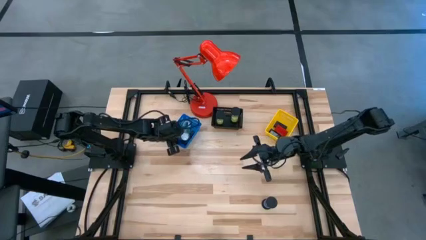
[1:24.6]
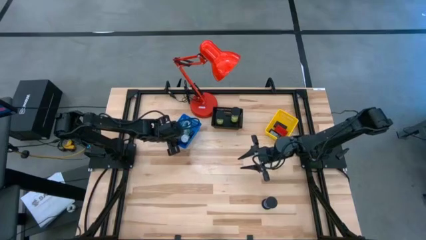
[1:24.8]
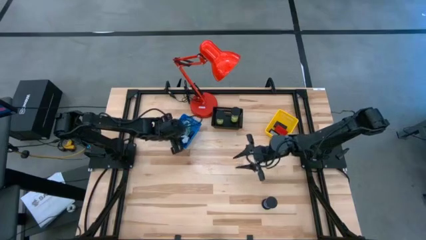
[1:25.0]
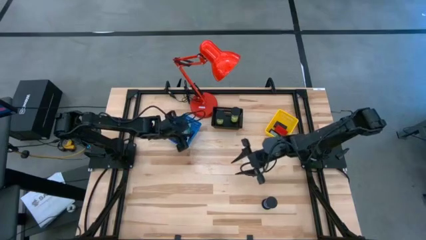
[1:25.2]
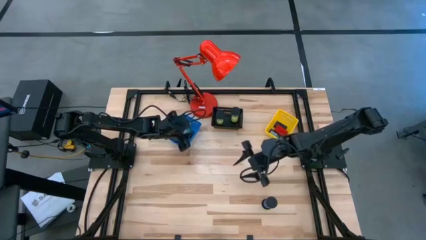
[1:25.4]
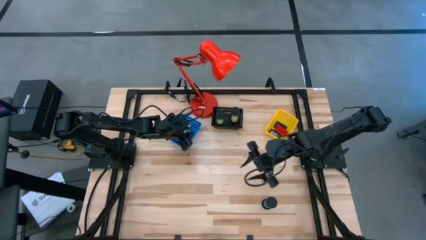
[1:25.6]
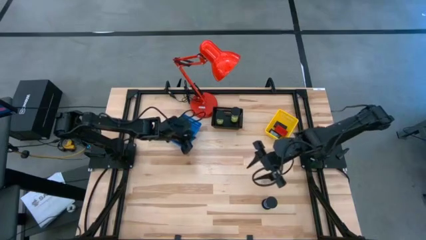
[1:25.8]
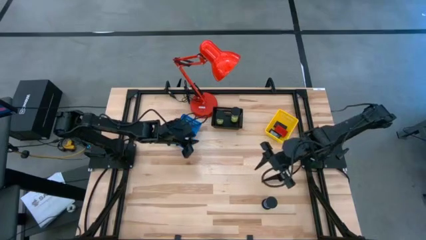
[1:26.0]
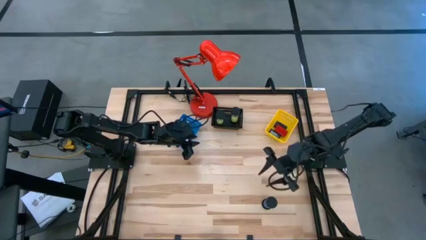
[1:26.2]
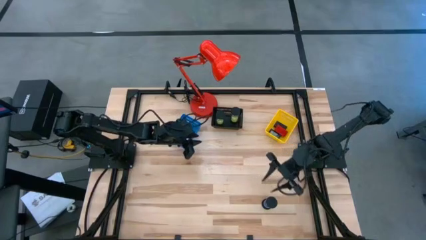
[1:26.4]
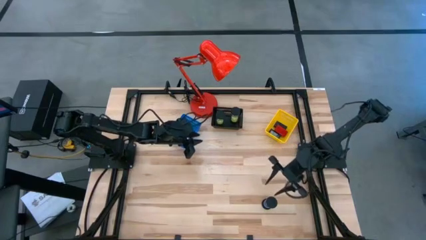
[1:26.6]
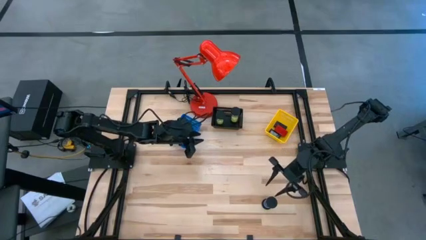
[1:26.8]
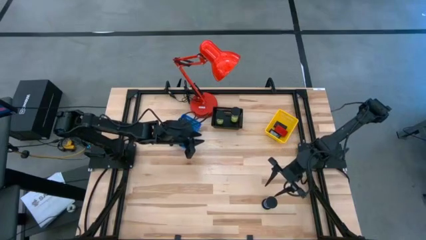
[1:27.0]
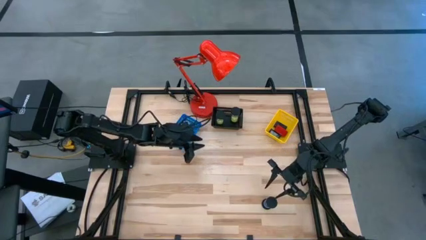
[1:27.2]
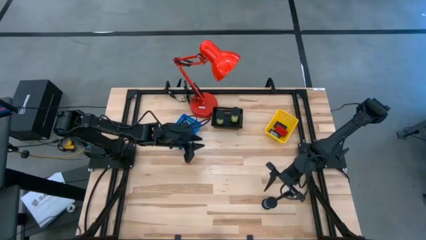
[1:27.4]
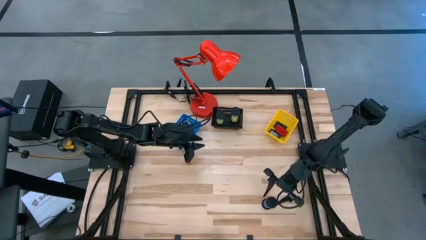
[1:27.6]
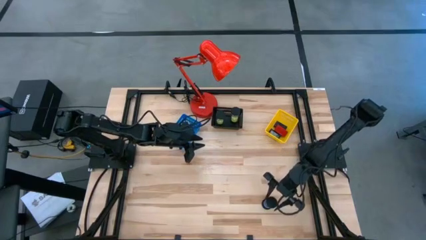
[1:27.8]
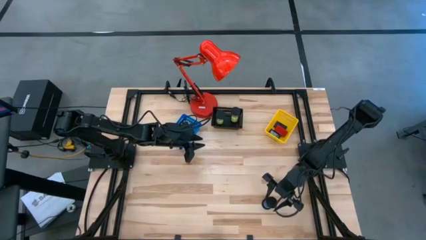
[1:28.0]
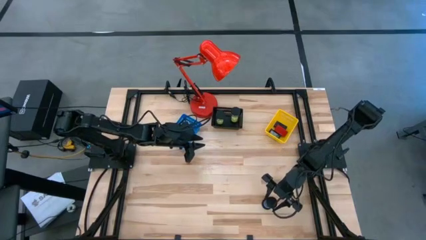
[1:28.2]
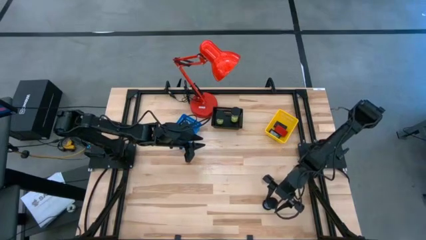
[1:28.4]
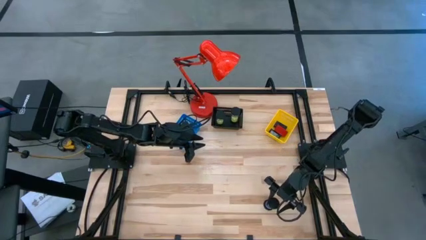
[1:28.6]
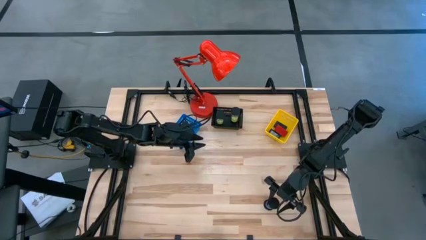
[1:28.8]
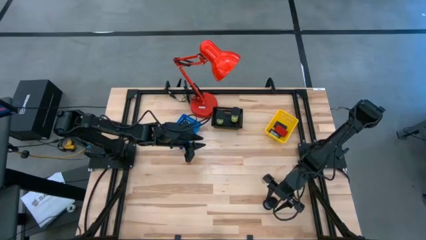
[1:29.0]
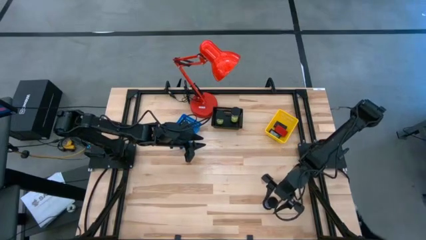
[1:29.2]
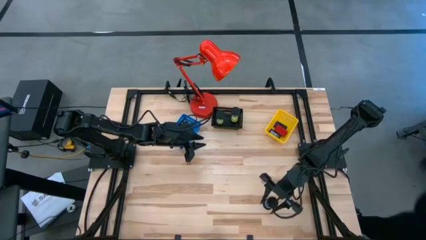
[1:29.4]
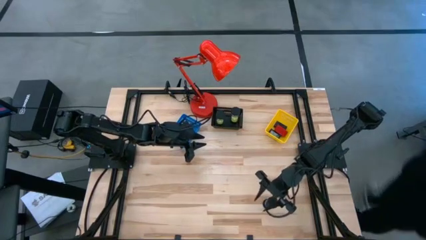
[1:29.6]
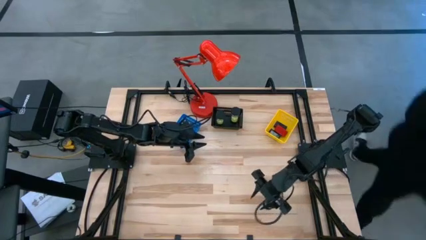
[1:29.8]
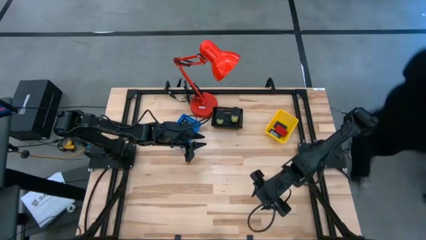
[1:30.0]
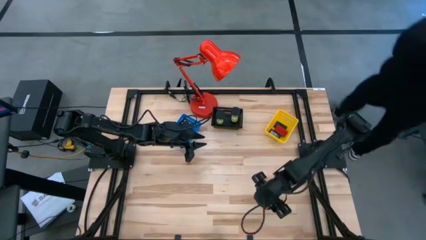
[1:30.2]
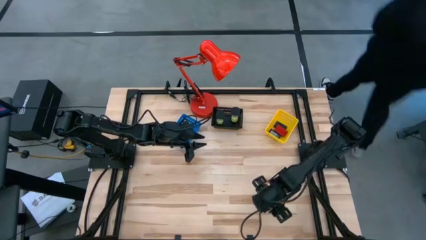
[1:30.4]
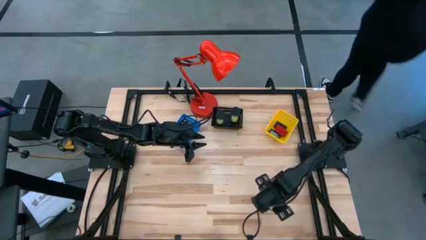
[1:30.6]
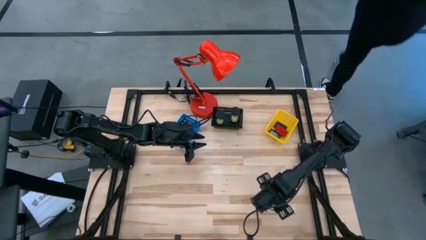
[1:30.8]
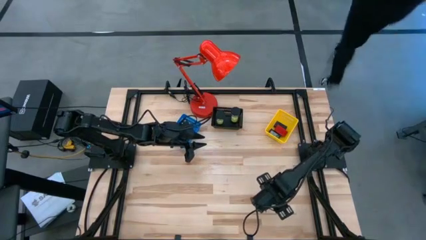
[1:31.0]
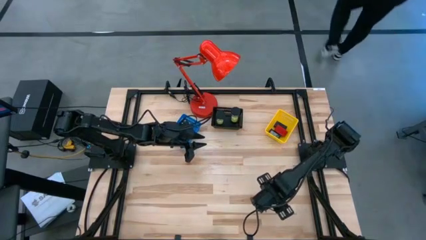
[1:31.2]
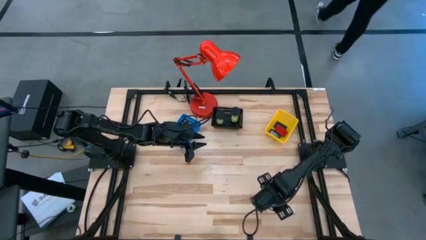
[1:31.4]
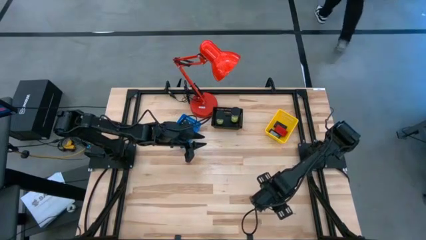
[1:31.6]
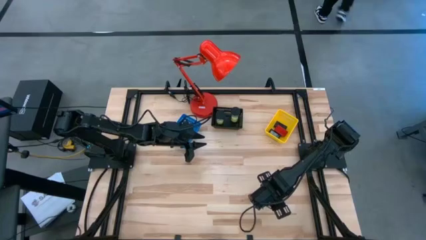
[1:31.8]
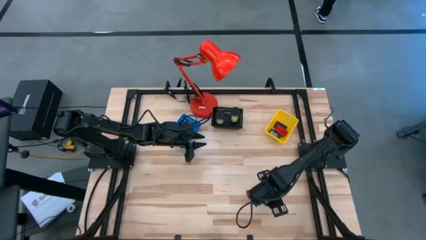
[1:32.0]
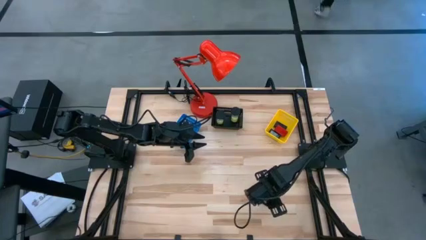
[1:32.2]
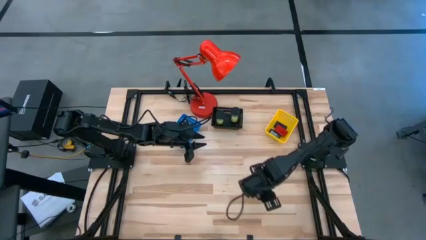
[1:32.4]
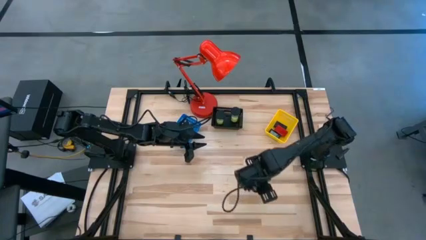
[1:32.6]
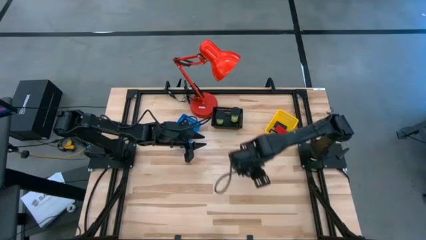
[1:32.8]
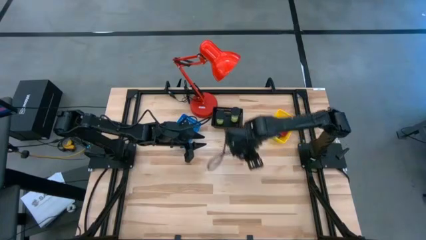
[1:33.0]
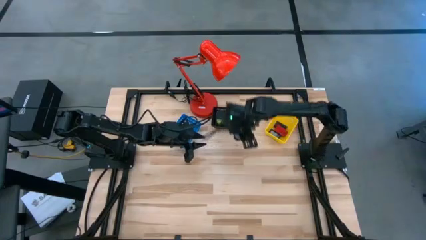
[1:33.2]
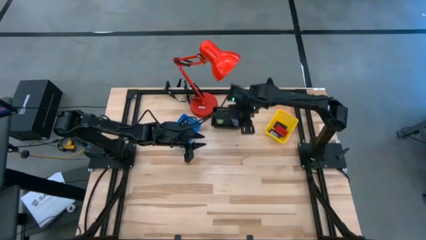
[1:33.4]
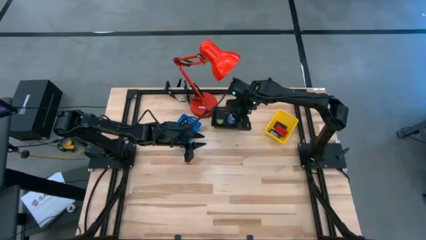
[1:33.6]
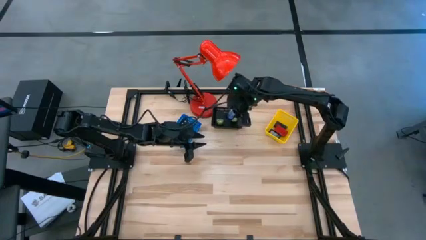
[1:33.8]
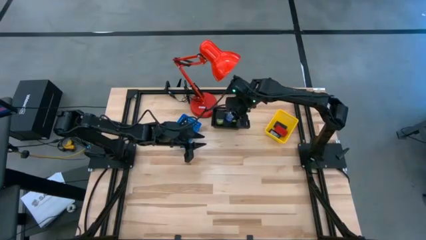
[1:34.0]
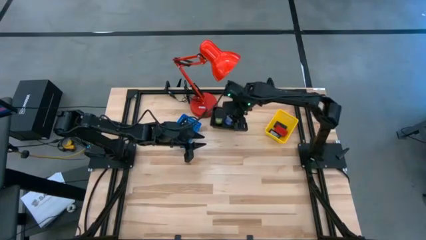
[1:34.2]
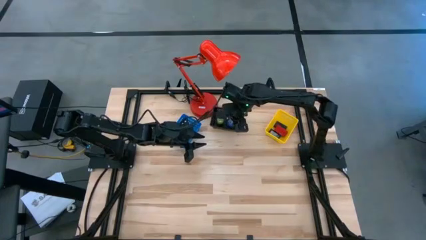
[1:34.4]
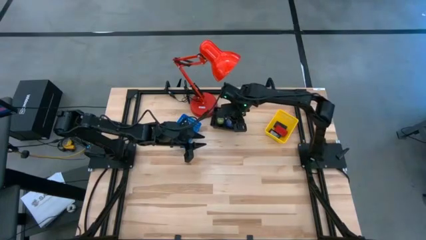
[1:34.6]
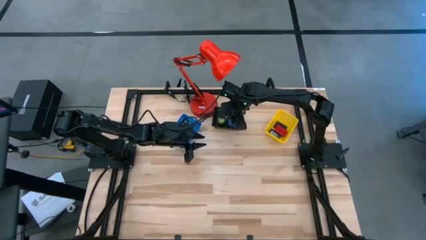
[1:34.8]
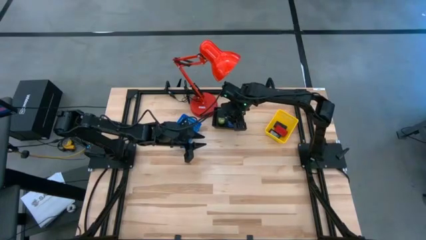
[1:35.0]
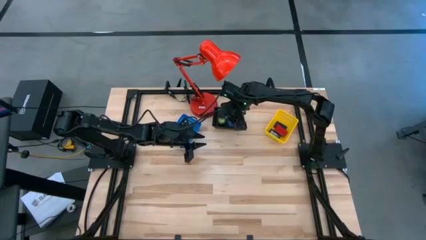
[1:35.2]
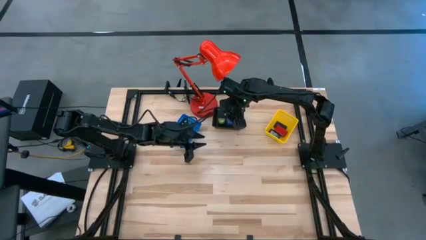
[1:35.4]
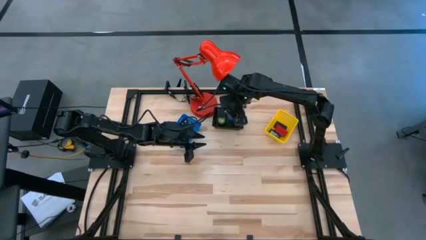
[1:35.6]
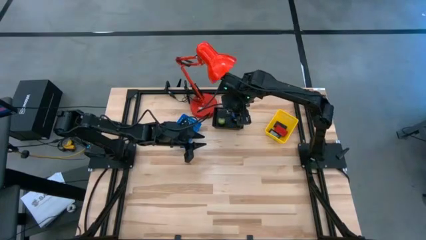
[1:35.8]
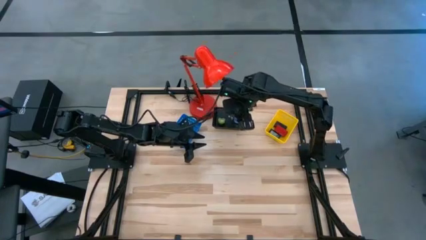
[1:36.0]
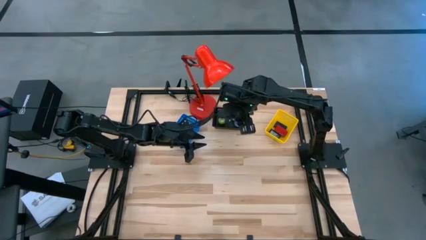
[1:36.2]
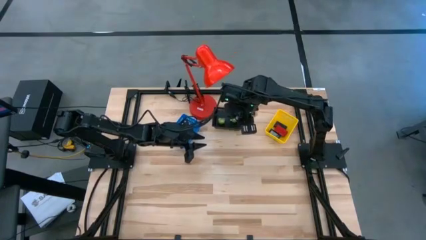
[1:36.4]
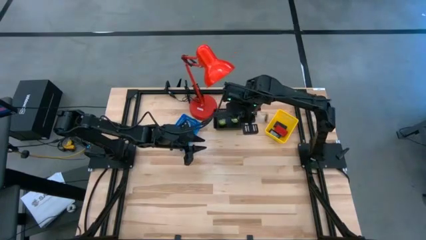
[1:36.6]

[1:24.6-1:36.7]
Task: Pick & Place Office items
Put the blue hourglass into the black bin
